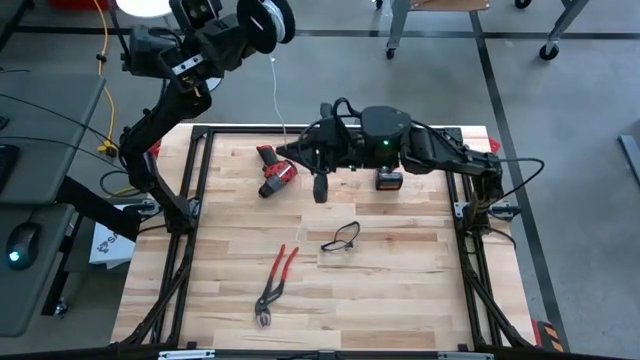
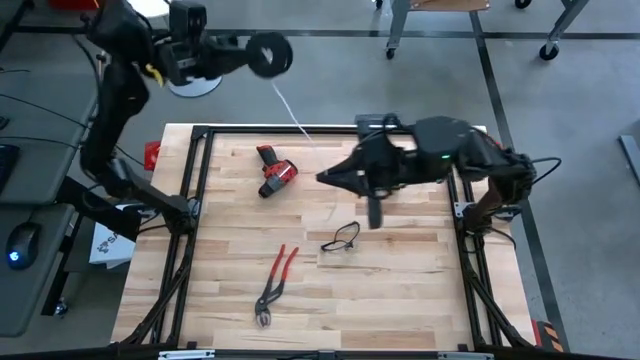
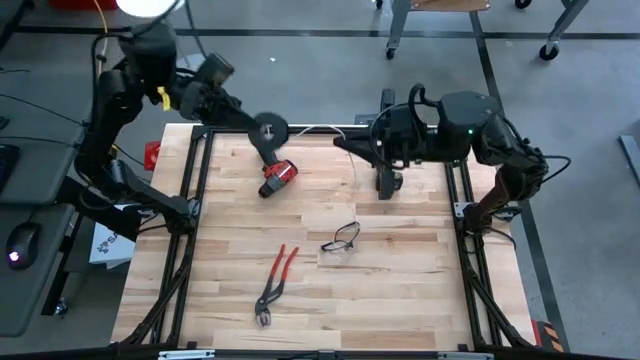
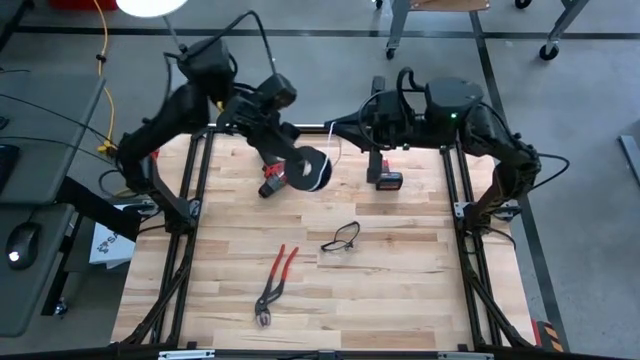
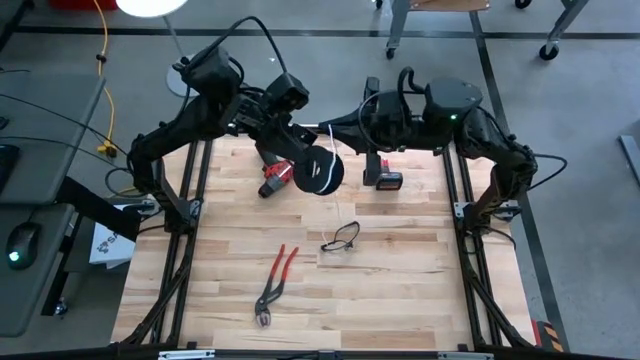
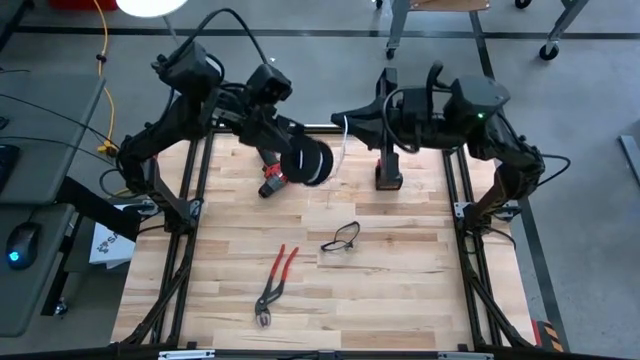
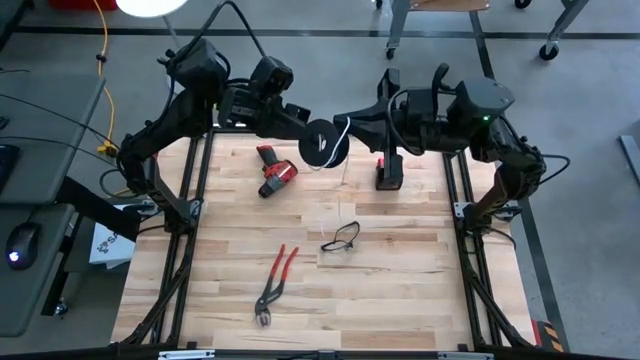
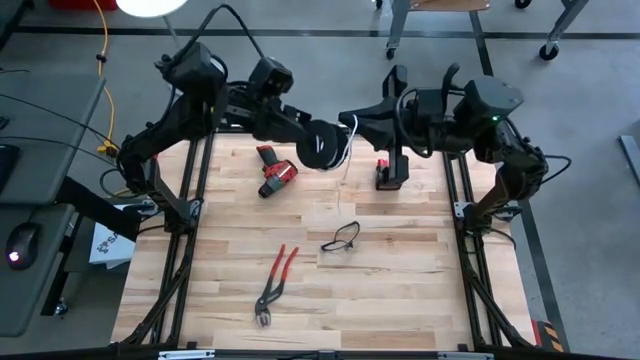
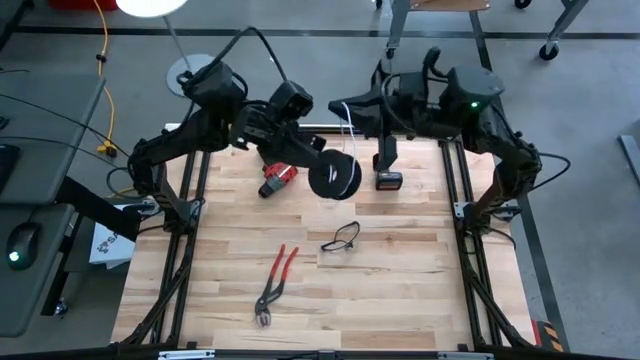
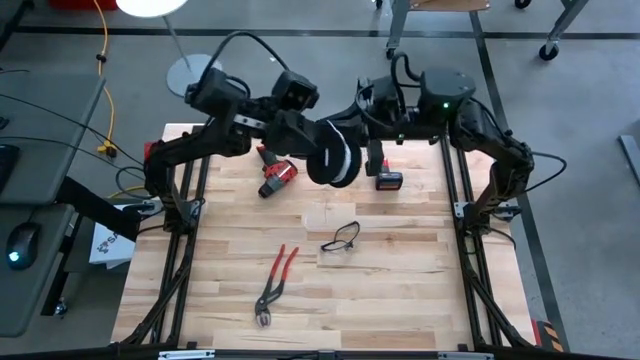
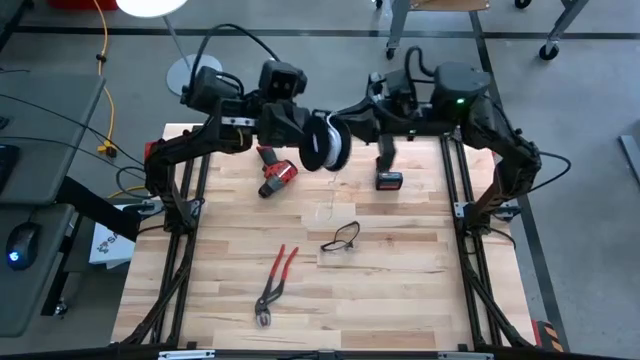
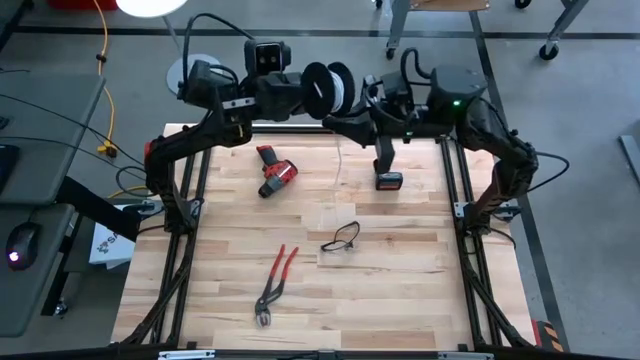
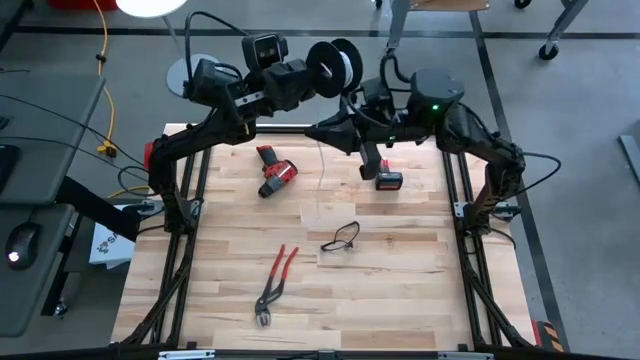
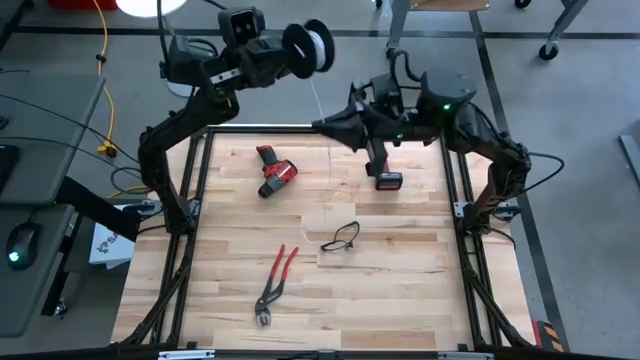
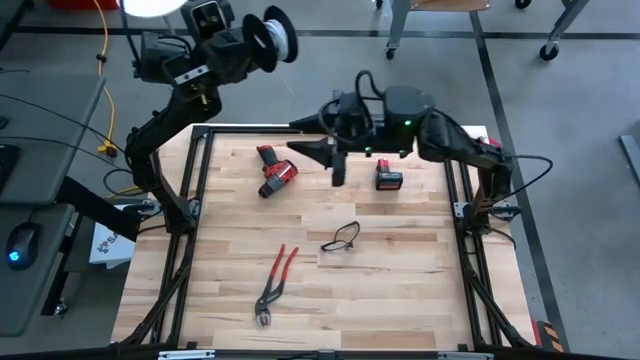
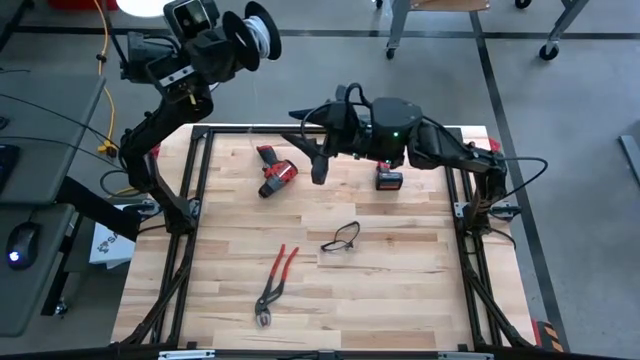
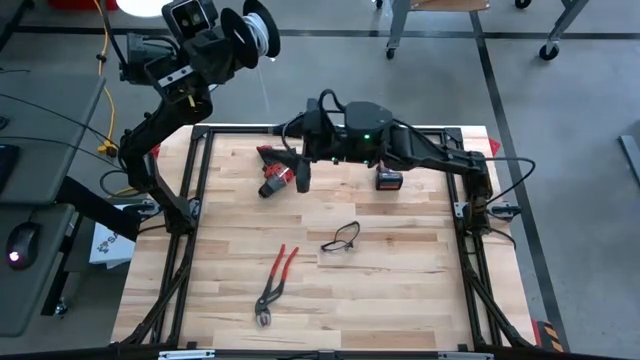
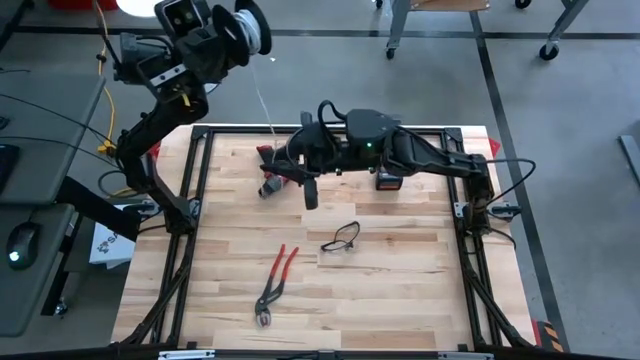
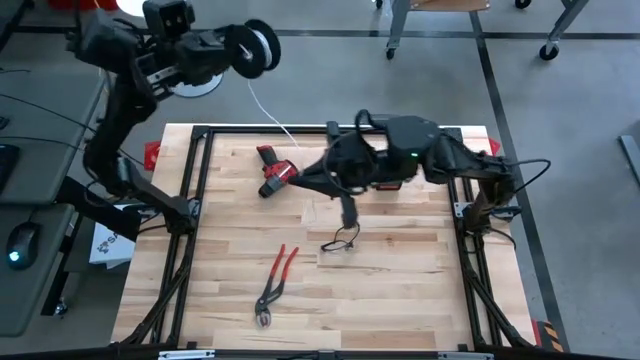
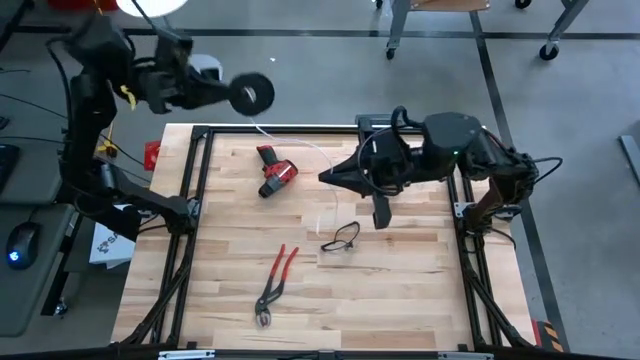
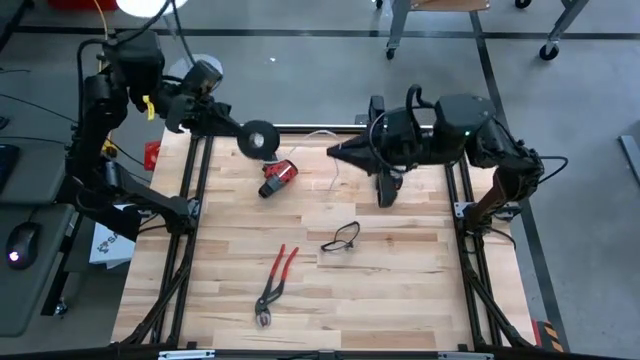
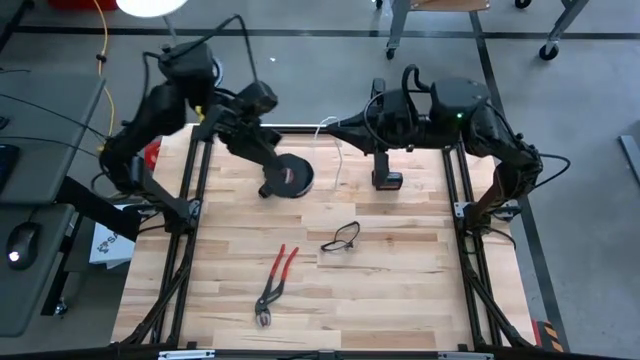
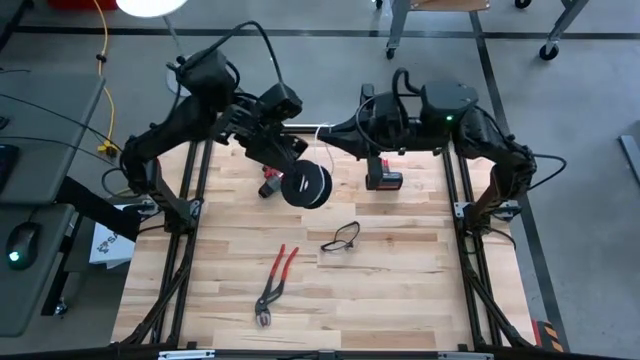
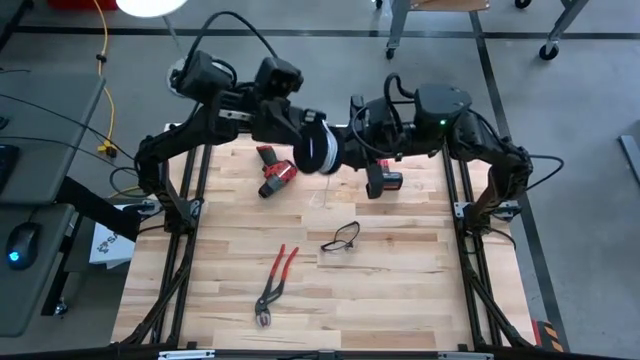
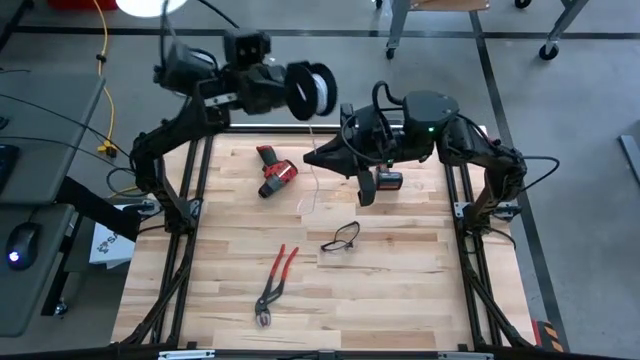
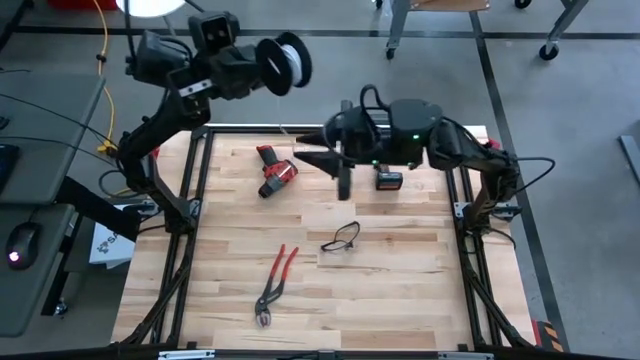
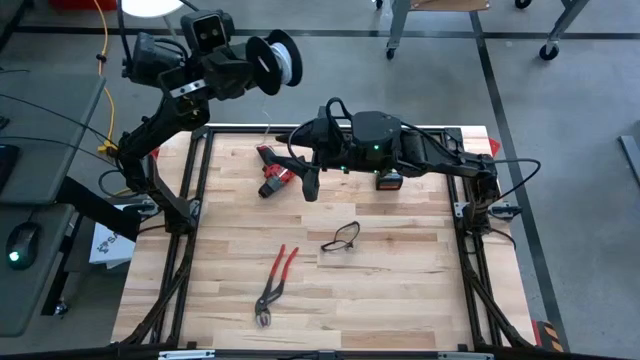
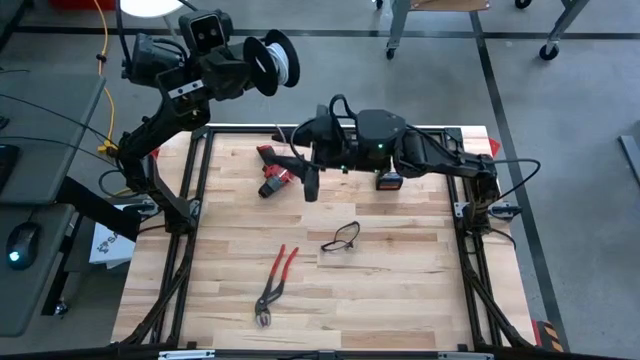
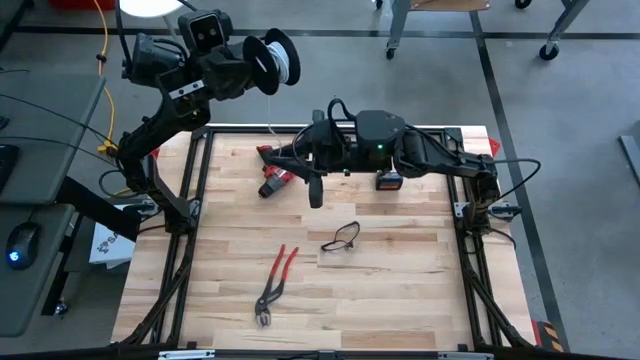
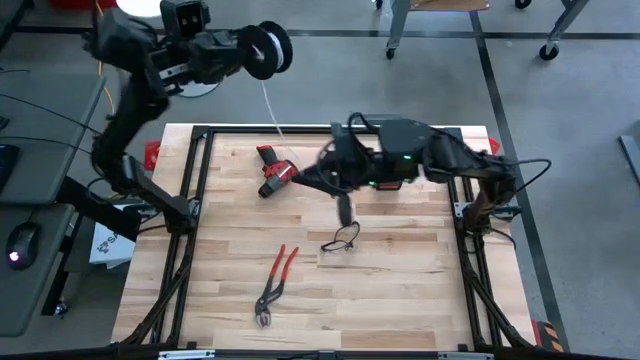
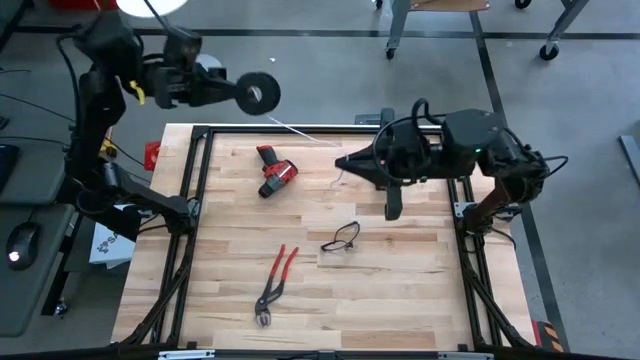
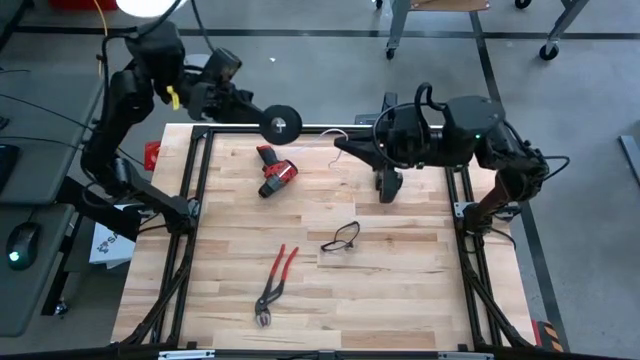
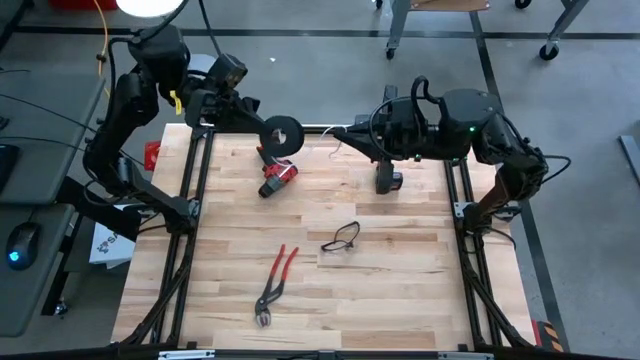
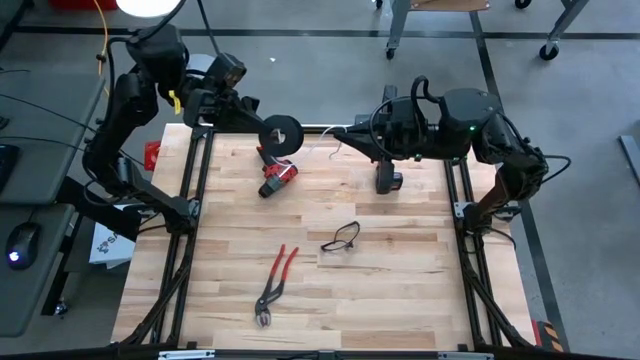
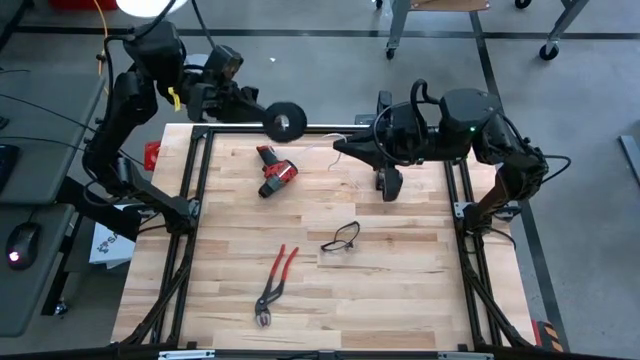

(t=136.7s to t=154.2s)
Task: Coil cords
Coil the white wire onto the black spool

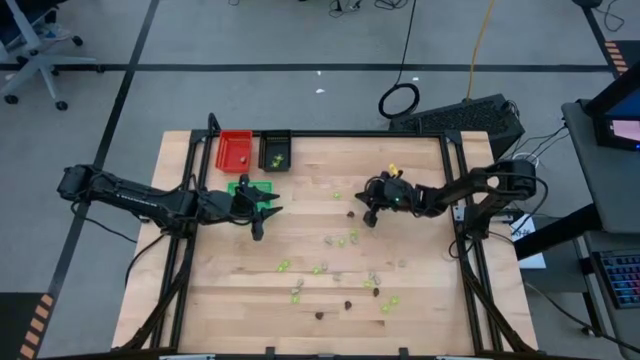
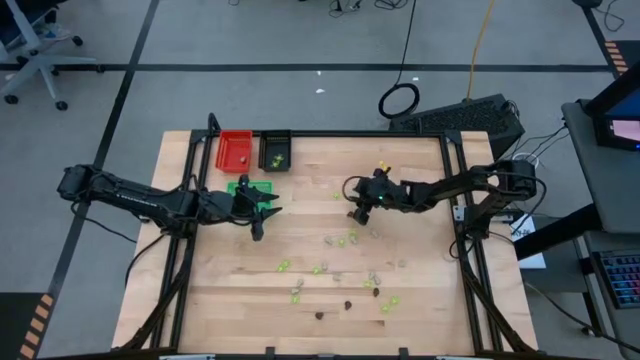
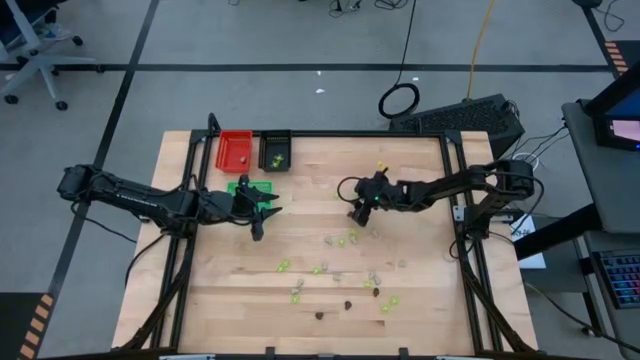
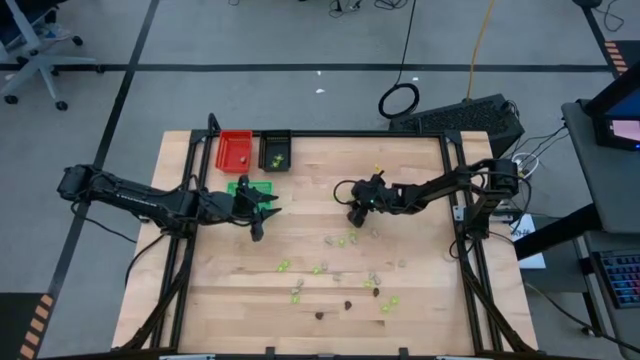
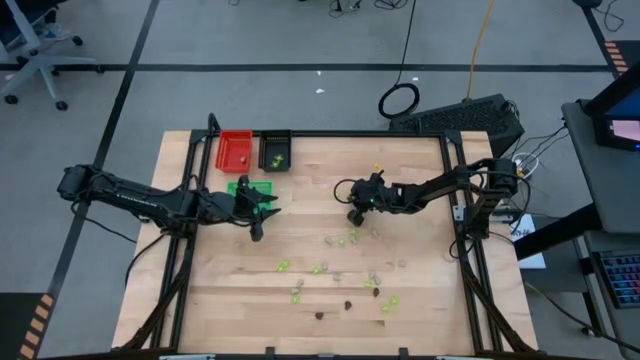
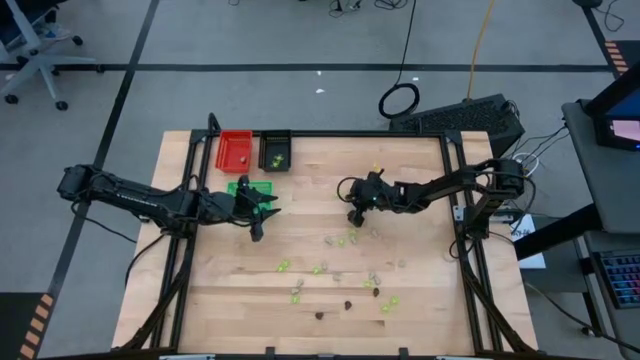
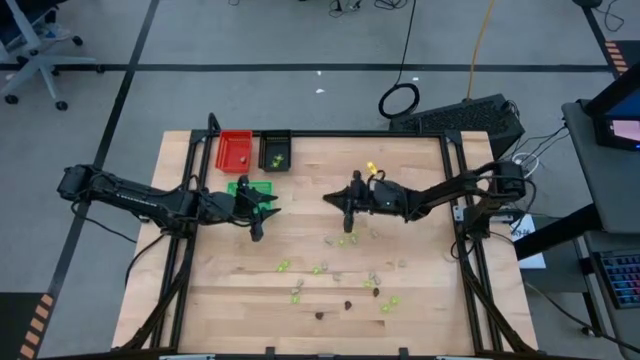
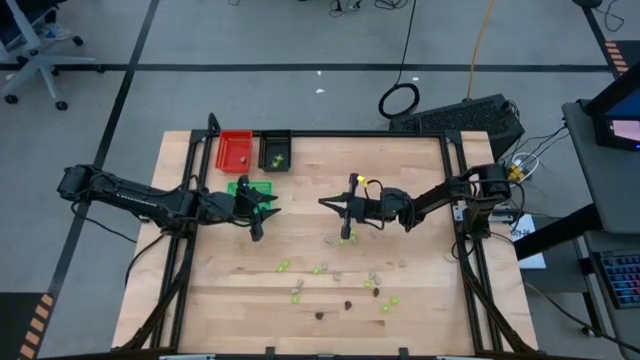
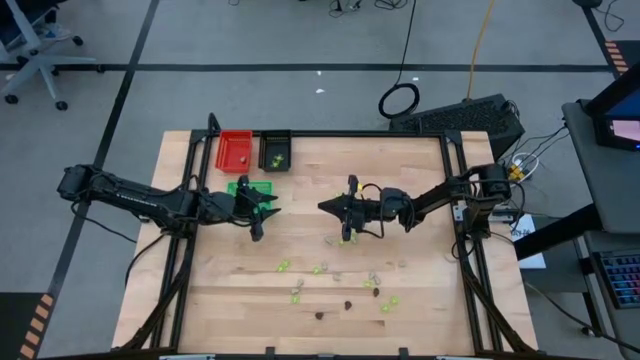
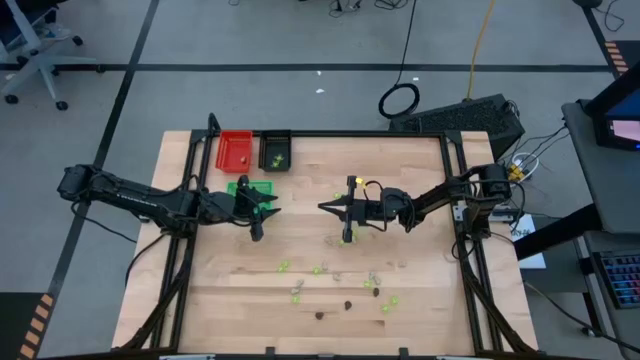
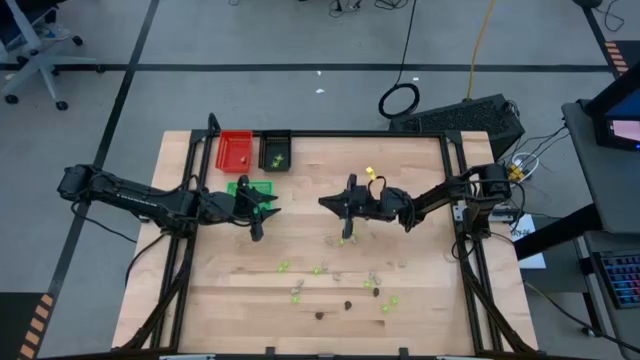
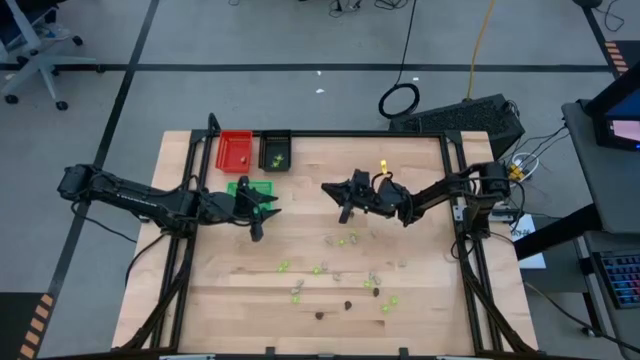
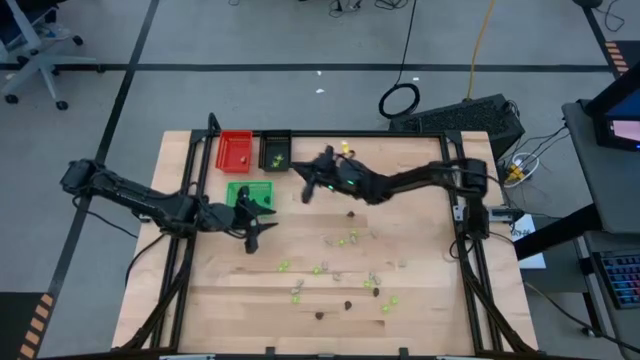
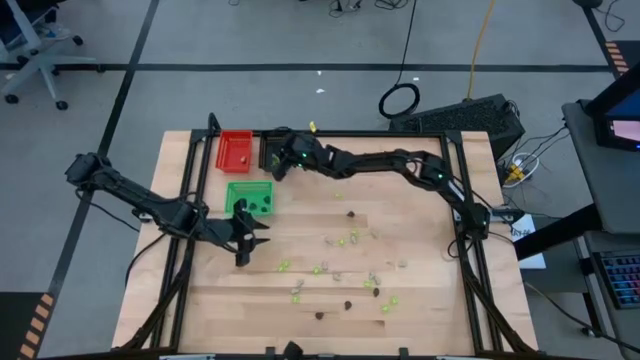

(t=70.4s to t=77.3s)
Task: Sort Halloween decoration
Put the green spider toy into the black bin
